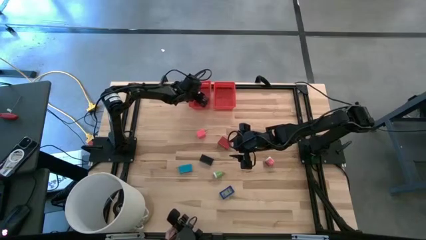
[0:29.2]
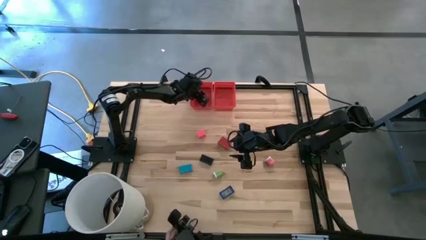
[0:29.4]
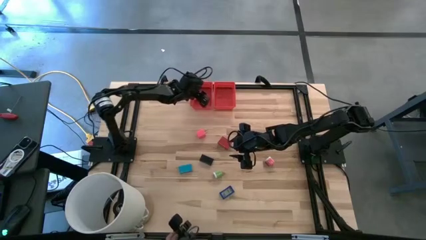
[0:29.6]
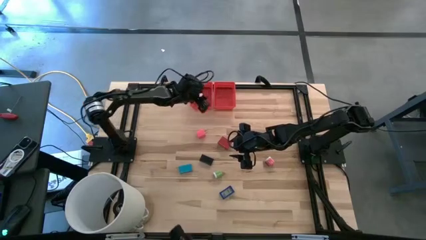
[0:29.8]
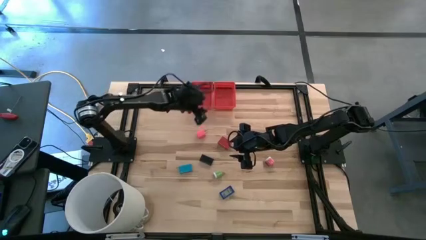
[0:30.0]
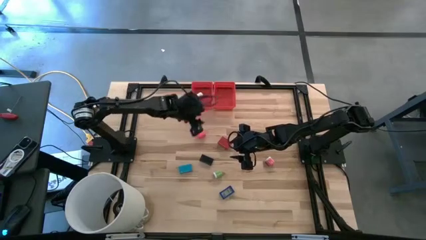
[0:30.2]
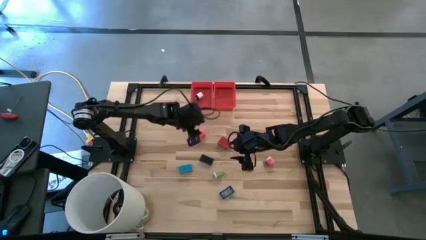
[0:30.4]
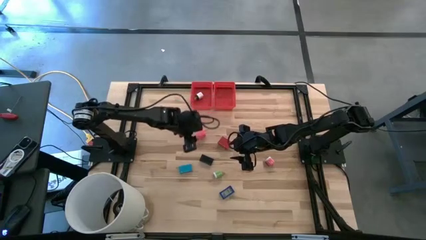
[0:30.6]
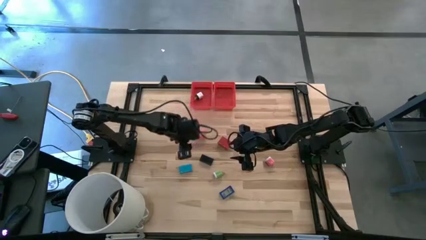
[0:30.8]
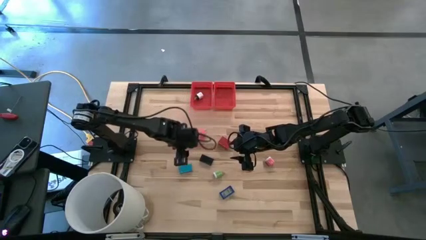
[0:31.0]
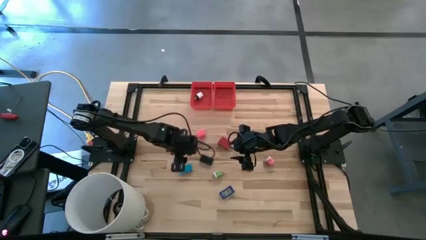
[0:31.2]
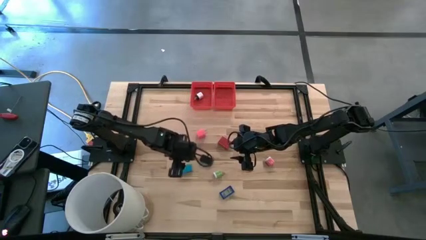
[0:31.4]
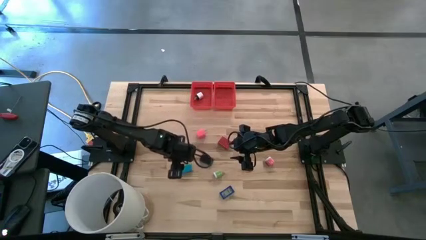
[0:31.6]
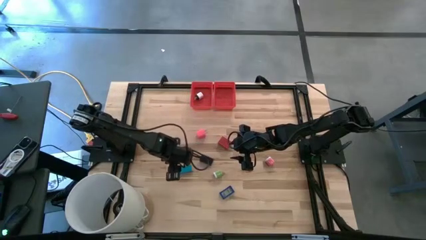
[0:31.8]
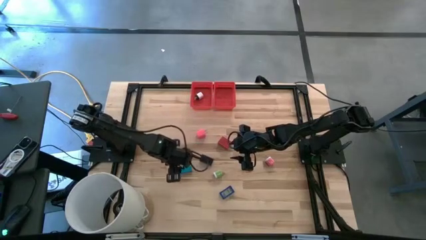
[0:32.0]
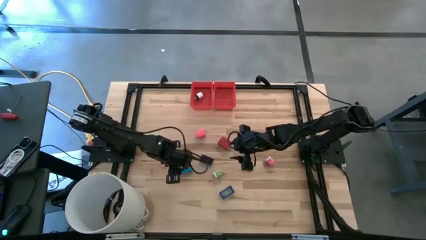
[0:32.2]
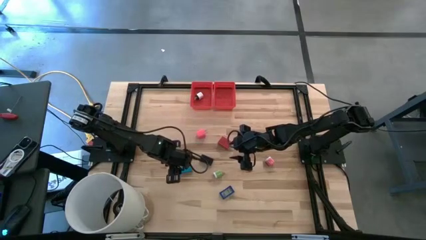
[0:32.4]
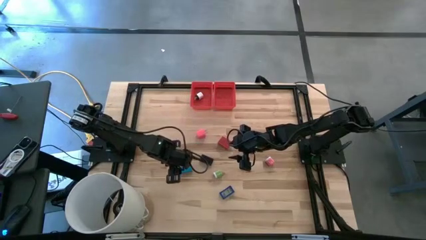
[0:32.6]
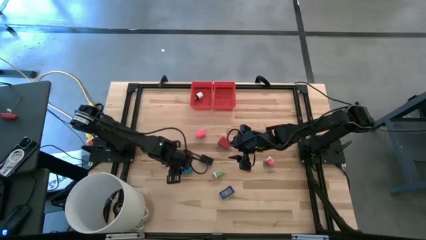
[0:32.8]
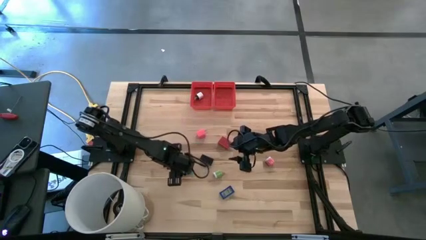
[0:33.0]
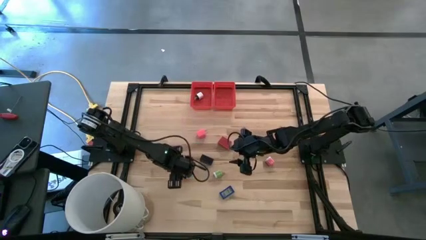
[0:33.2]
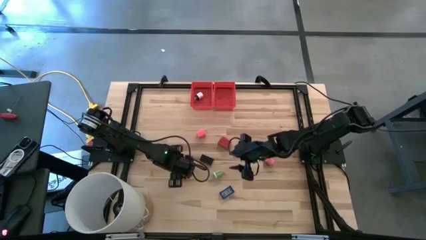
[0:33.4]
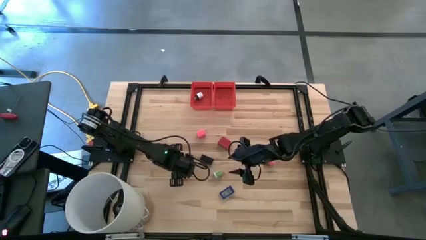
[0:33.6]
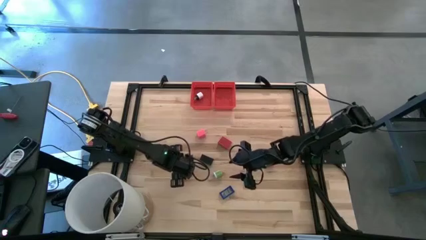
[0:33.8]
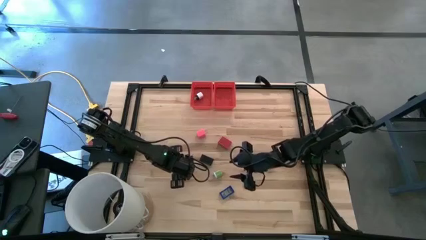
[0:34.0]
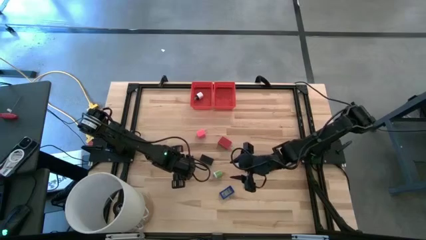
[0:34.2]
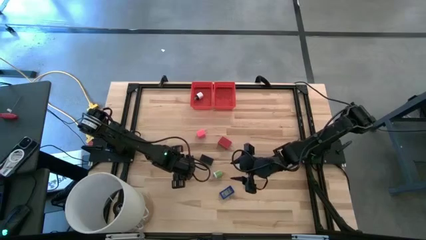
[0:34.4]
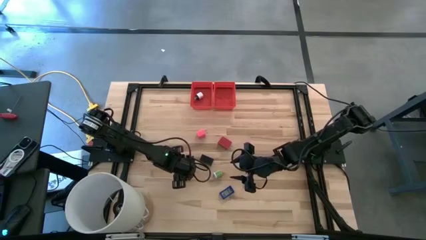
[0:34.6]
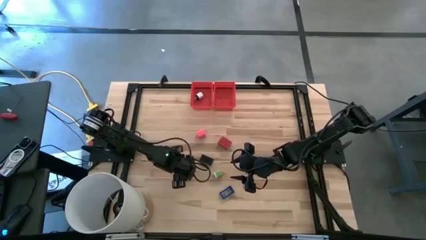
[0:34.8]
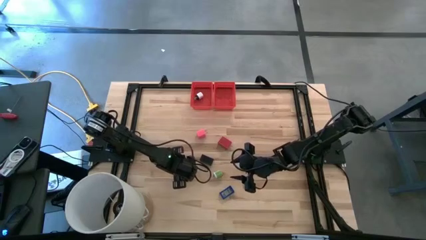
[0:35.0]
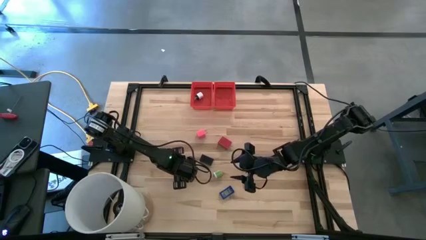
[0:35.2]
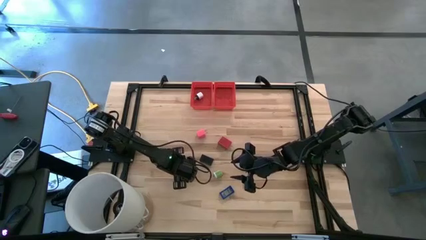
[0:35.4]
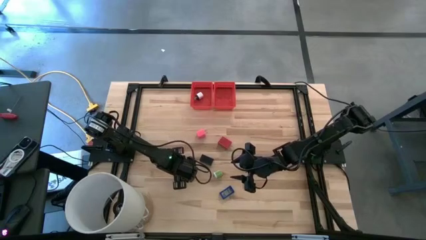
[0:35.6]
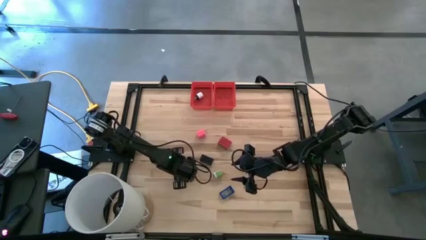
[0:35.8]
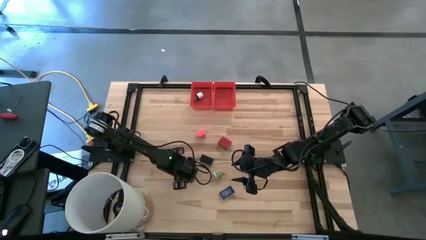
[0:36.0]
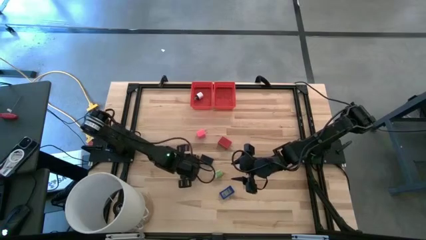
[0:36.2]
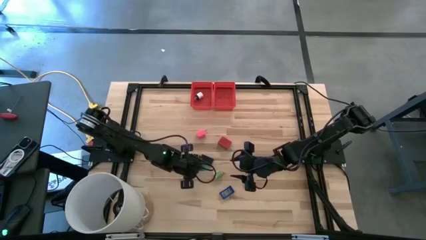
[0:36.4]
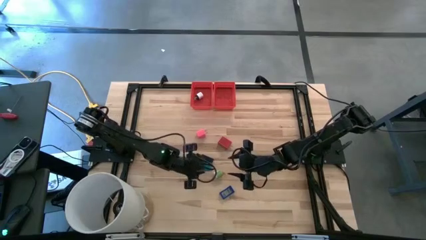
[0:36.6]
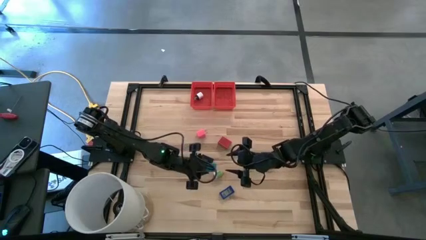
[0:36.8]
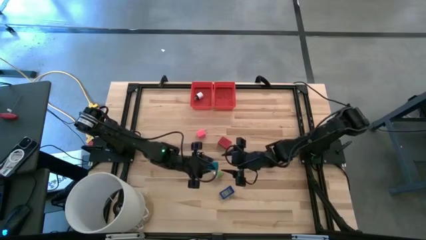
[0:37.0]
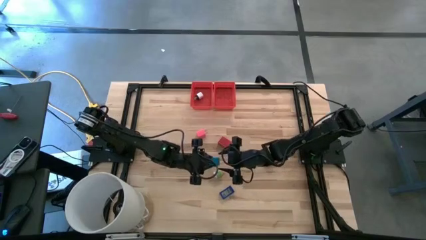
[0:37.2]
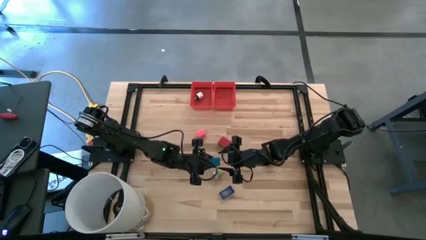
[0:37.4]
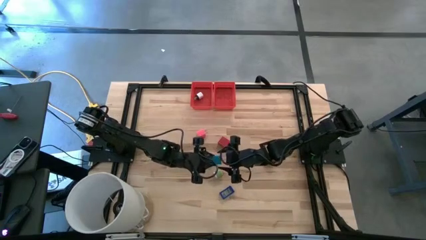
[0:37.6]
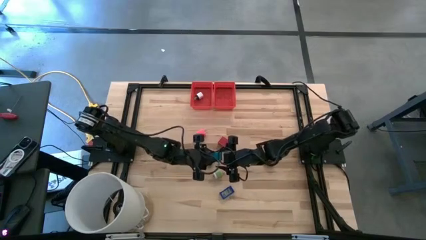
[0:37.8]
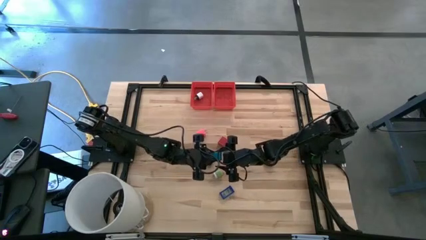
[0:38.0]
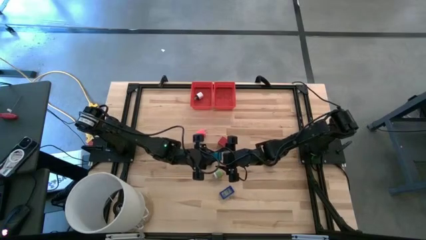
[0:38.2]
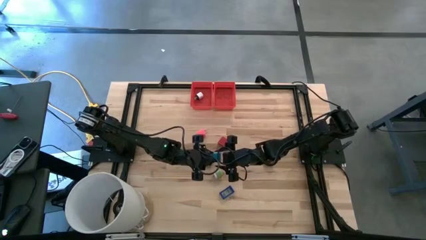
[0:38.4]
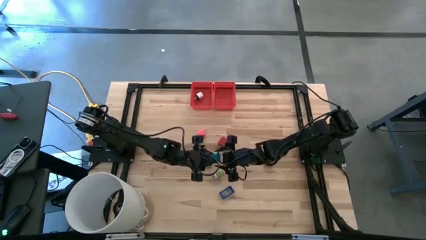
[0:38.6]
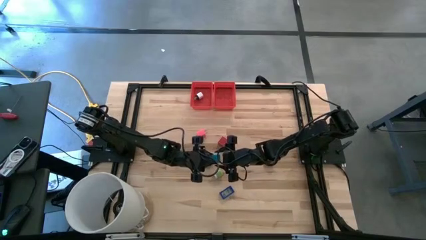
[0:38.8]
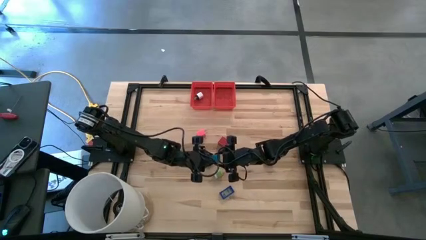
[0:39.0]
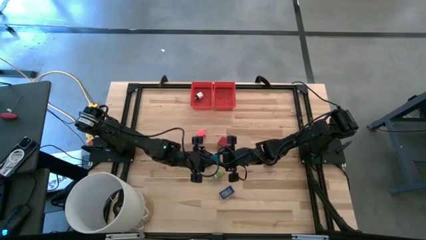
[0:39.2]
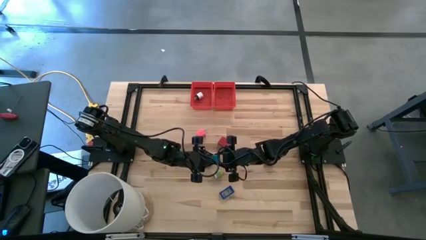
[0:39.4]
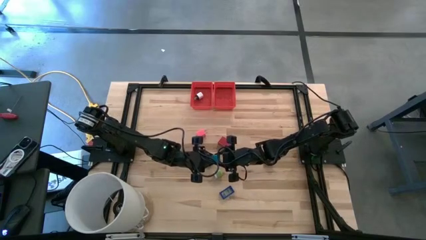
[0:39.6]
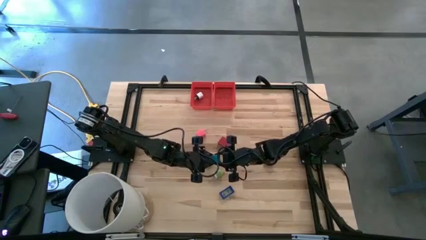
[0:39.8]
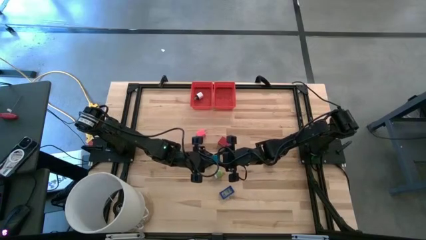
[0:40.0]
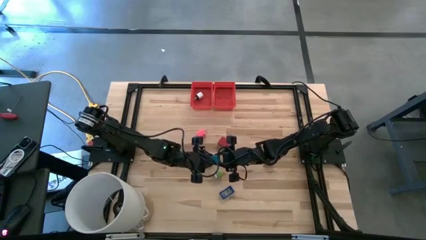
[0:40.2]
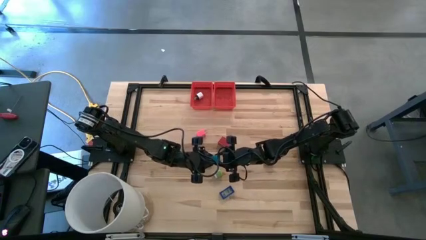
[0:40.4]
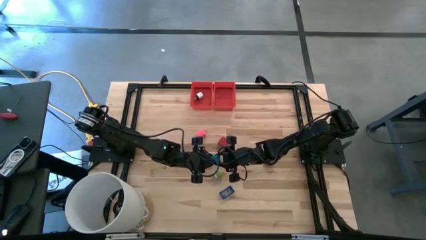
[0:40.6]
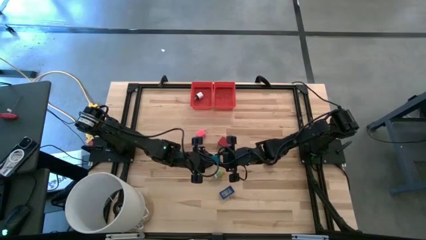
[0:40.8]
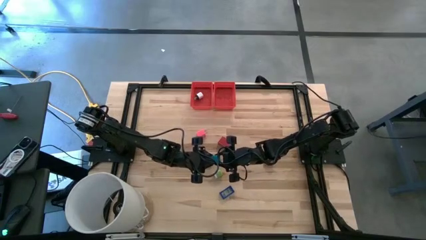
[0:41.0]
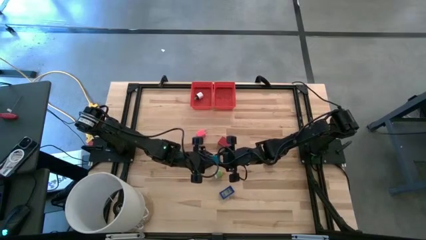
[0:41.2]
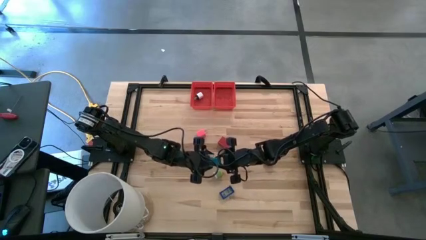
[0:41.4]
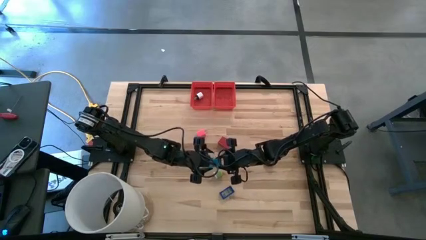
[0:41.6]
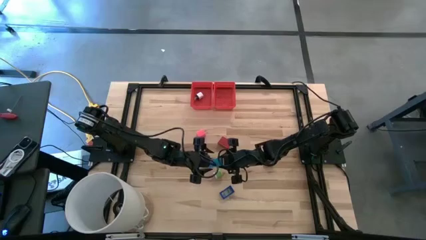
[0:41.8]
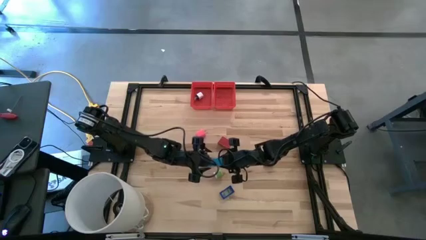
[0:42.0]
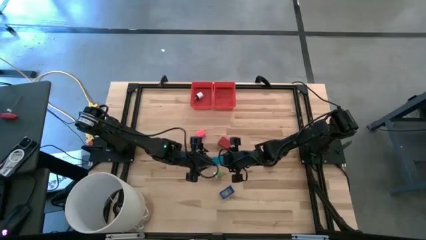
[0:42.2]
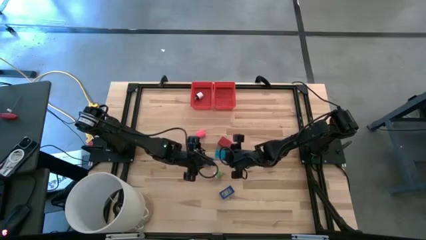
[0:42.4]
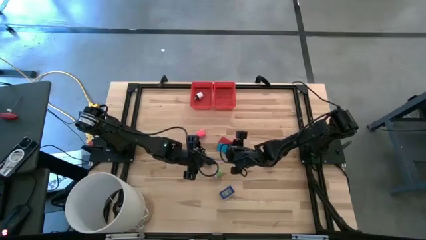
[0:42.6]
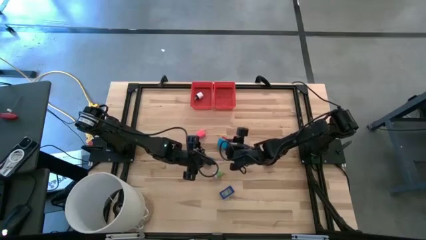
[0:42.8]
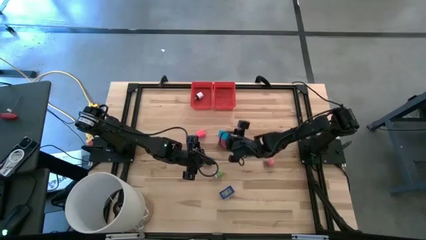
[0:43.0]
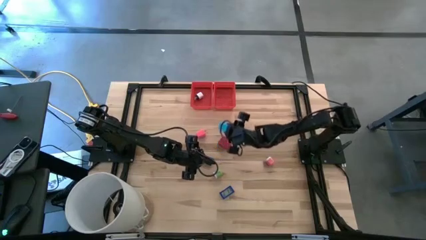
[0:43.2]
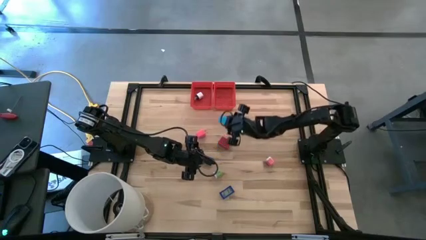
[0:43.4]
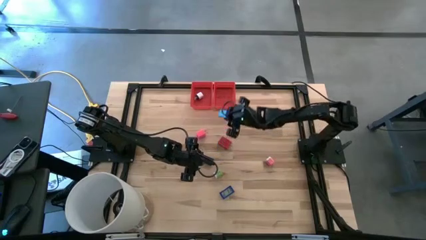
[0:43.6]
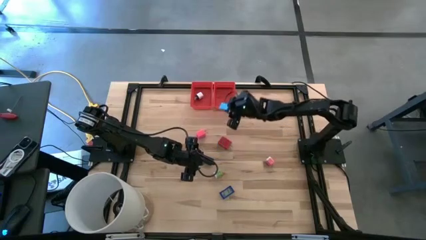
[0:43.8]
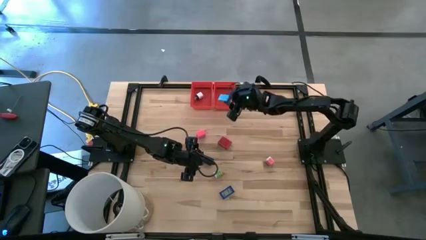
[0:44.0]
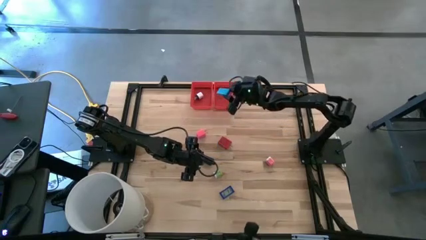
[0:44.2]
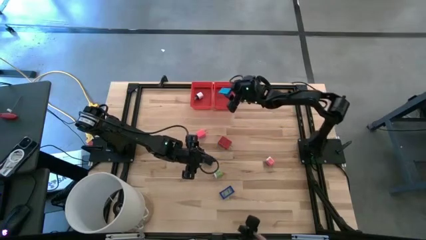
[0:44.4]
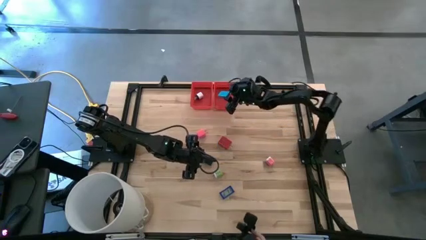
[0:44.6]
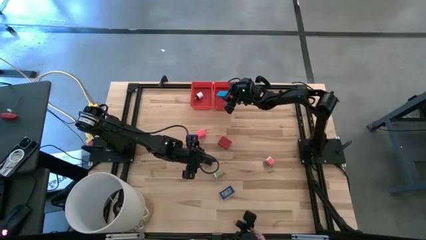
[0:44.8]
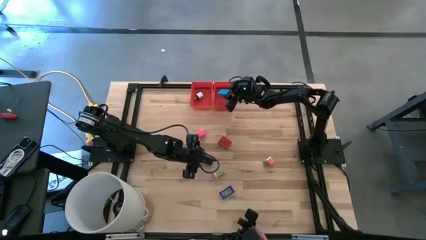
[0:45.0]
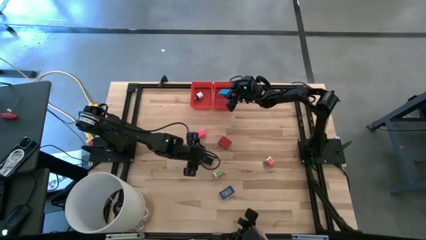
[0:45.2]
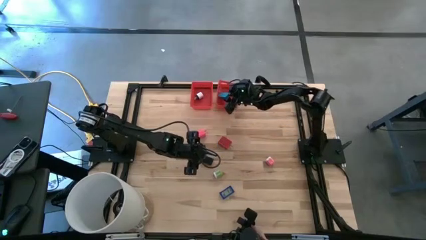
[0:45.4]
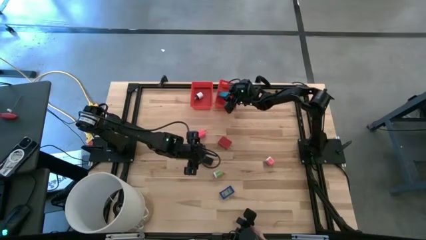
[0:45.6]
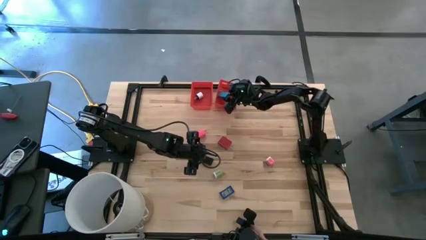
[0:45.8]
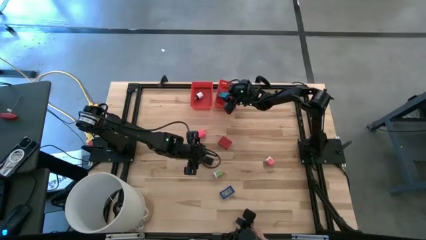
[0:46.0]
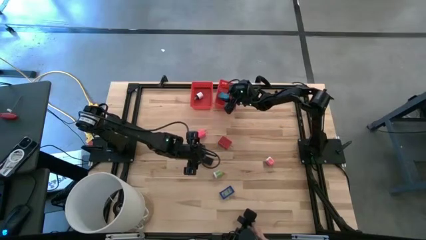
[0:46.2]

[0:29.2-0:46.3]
Task: Pick & Place Office items
Put the light blue digital clock into the right red basket
